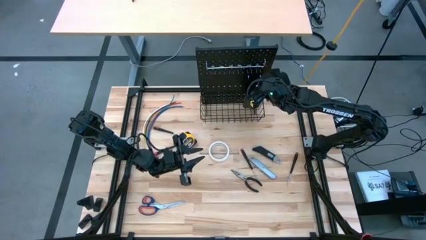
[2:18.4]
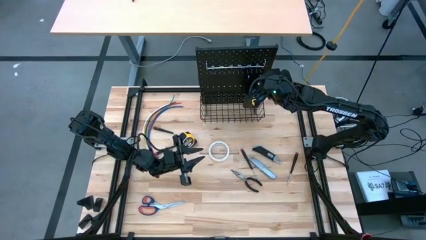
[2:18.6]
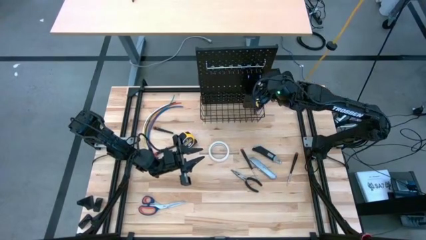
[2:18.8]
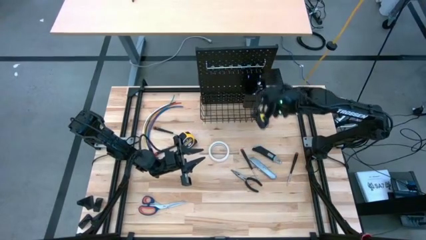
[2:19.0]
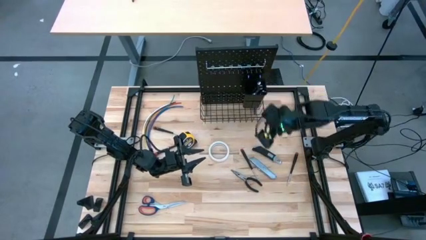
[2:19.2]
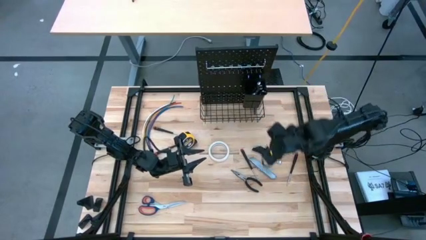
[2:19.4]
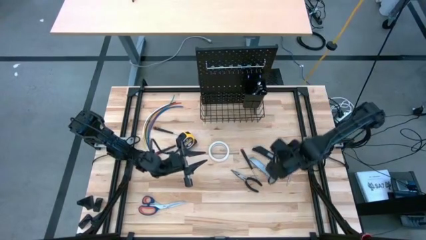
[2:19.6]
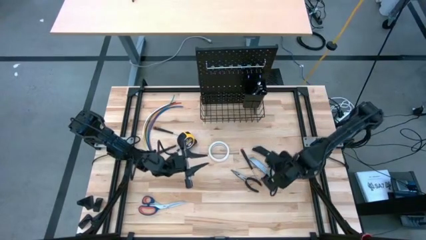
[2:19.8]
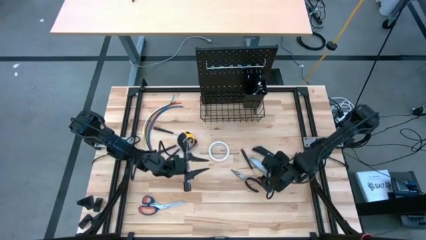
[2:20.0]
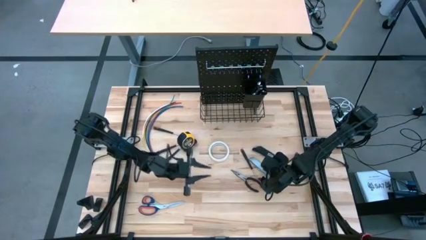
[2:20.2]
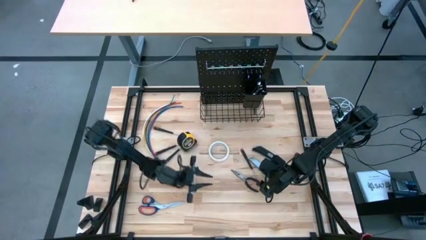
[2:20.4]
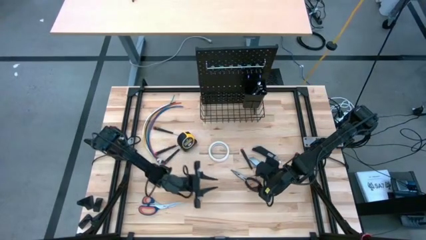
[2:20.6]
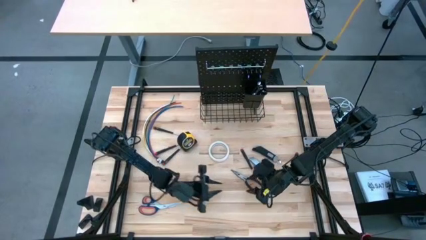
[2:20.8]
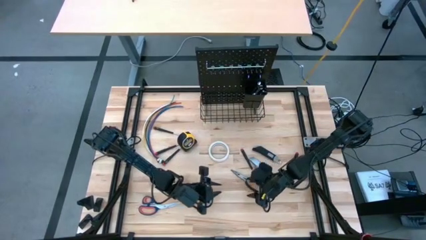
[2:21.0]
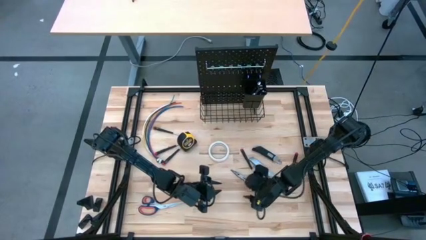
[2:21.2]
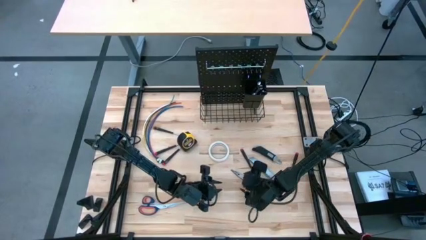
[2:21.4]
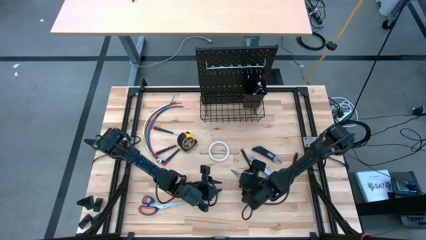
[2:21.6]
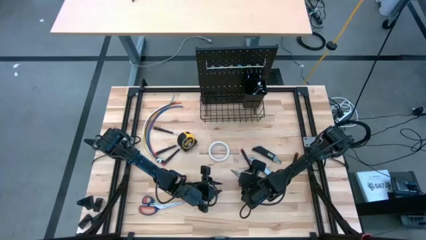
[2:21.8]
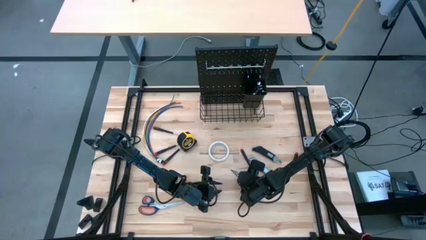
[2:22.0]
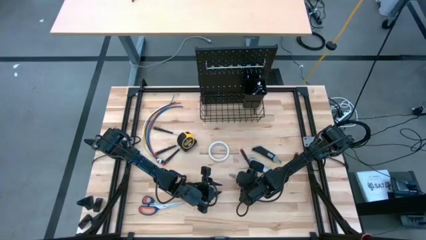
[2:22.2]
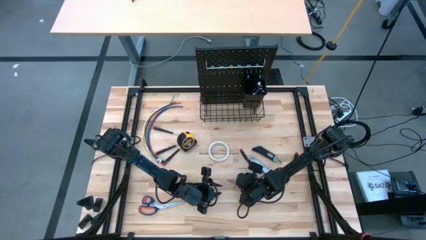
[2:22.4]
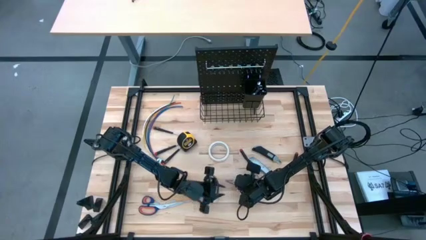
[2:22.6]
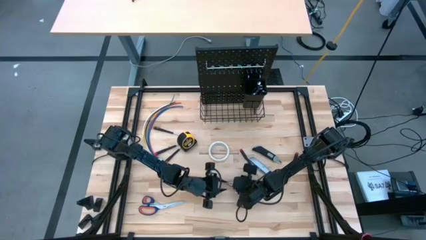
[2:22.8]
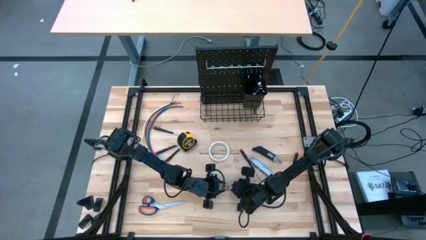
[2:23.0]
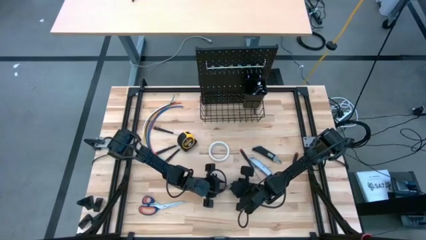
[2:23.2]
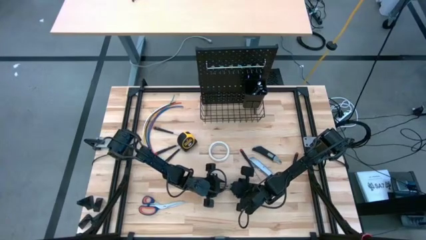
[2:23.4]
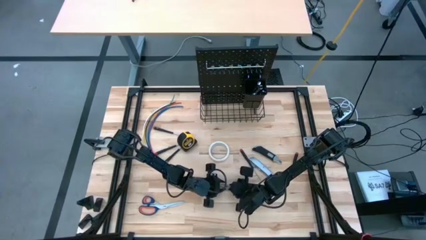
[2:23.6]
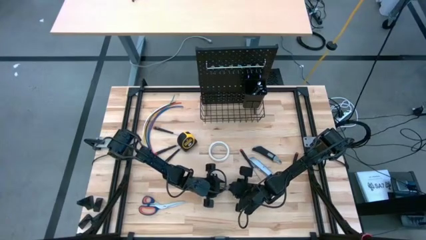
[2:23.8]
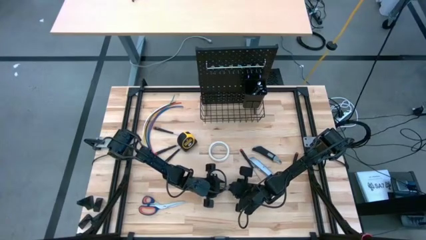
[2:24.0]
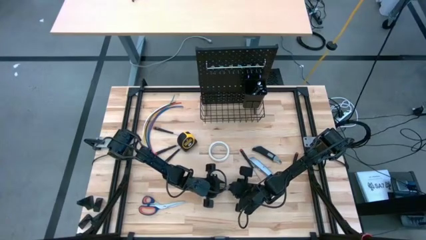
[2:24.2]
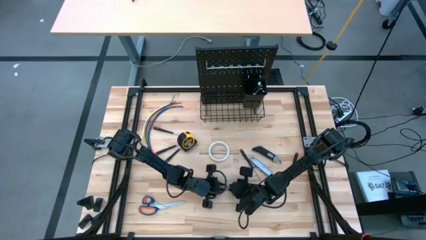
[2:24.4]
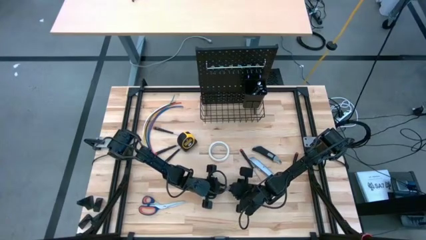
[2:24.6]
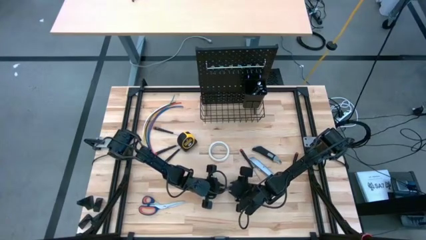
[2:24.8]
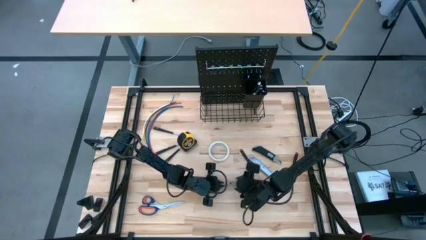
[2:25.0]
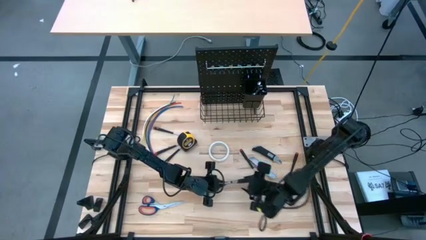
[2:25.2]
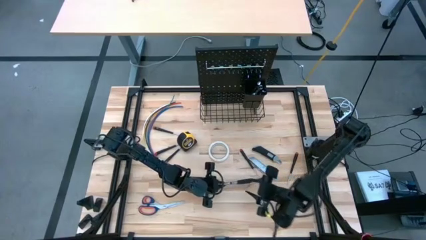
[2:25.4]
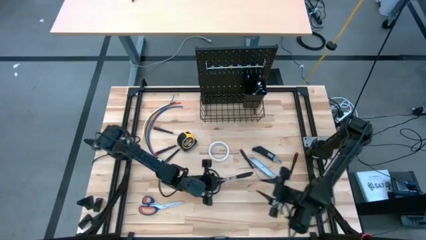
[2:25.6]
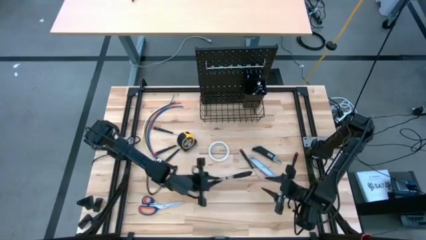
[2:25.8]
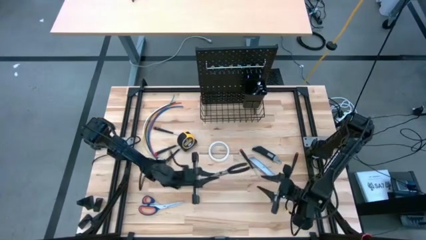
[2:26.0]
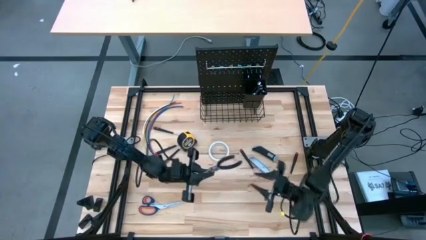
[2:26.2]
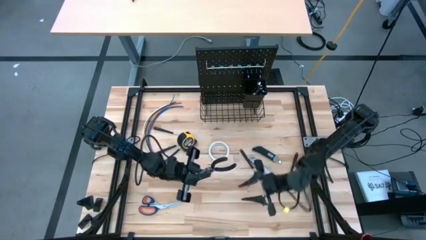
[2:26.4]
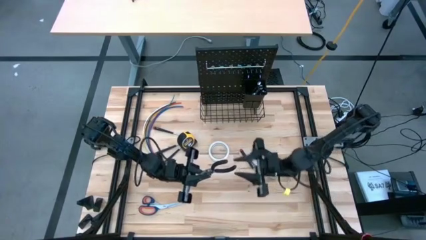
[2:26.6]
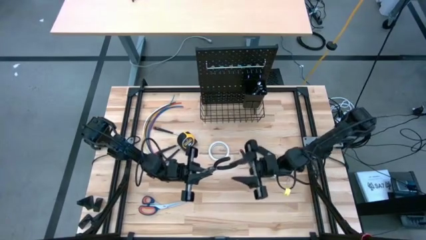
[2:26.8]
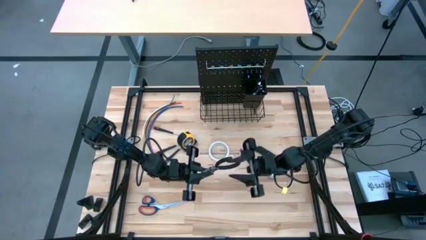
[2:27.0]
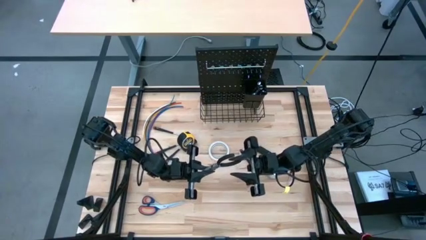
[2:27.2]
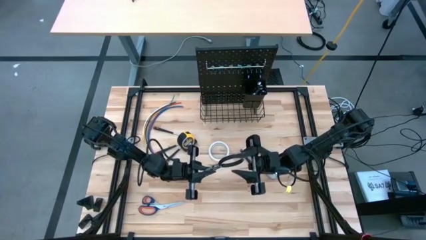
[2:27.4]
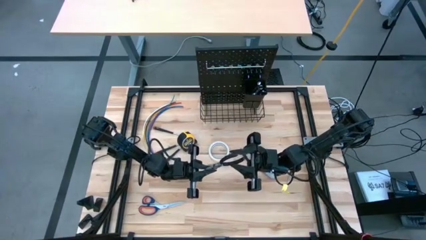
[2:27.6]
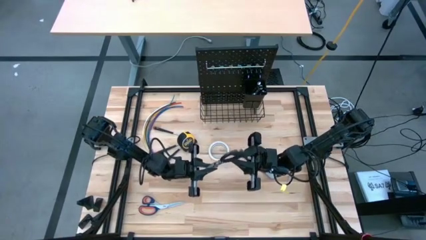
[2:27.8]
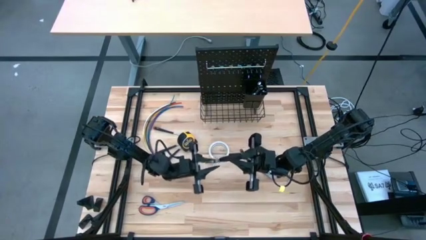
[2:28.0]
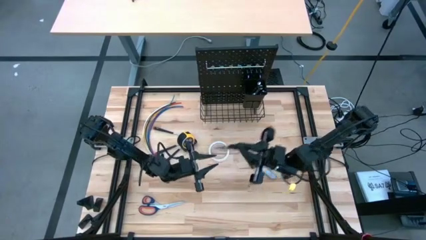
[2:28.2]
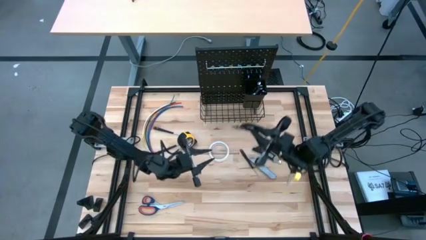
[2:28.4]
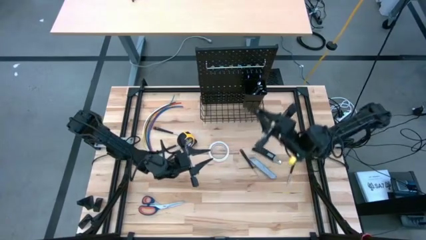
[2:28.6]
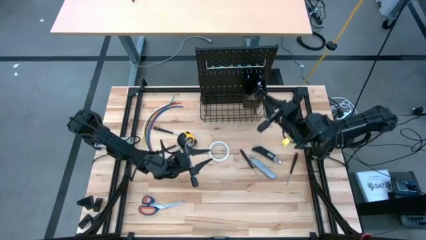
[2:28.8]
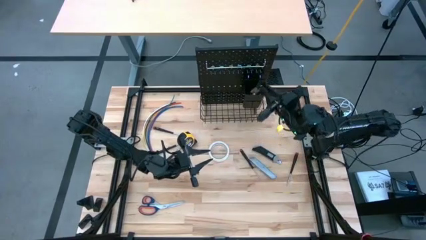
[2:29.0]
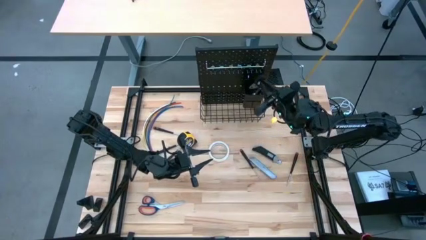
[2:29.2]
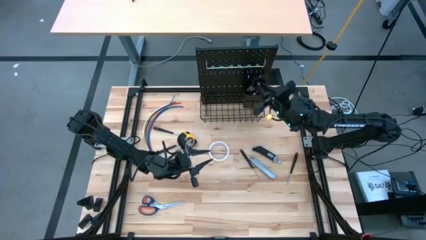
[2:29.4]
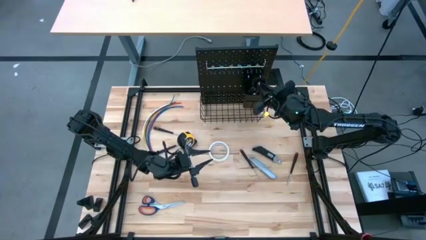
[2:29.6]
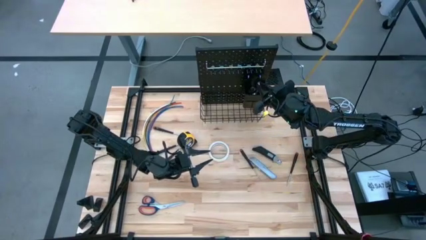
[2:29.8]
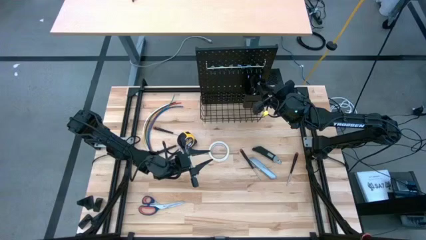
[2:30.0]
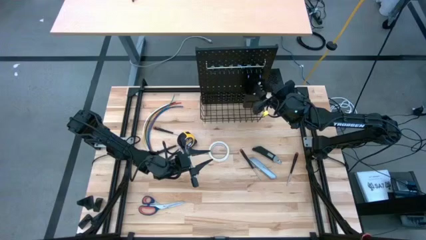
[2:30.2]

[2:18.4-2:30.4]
Task: Hang tools onto peg board
Put the black pliers into the black bin on the peg board
